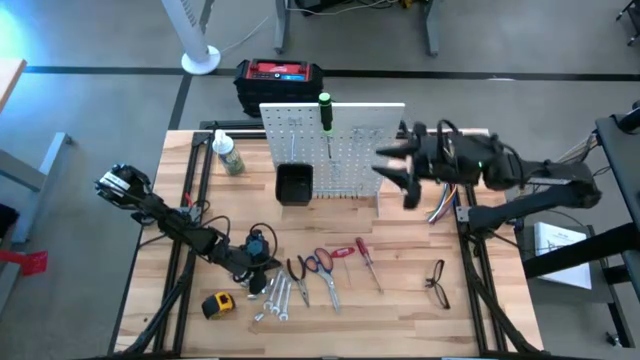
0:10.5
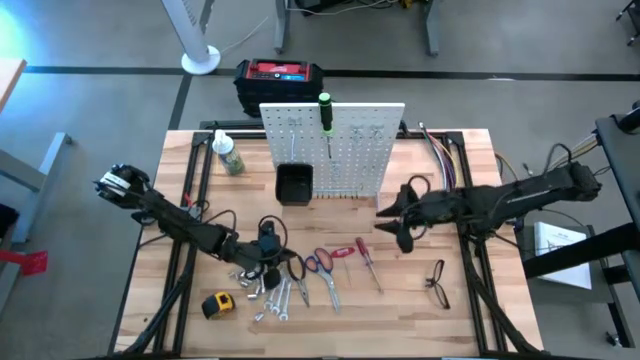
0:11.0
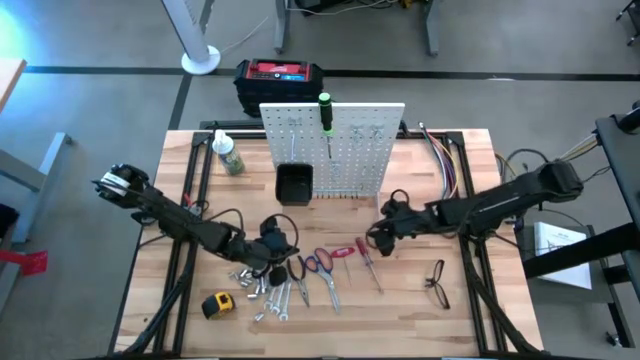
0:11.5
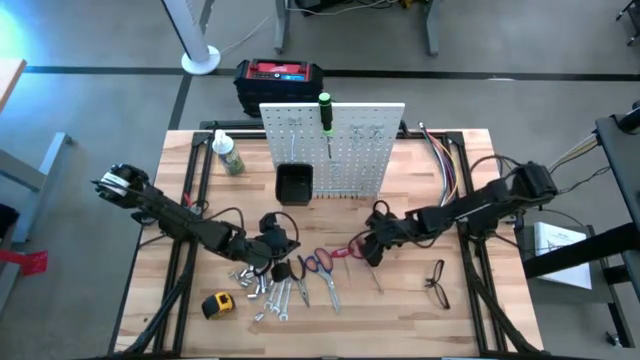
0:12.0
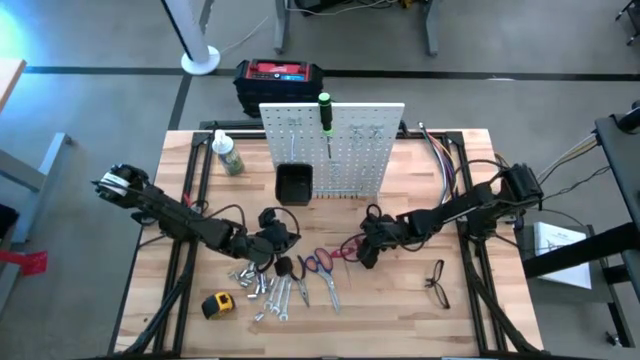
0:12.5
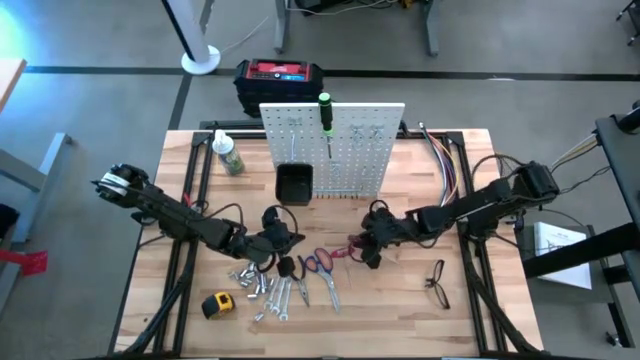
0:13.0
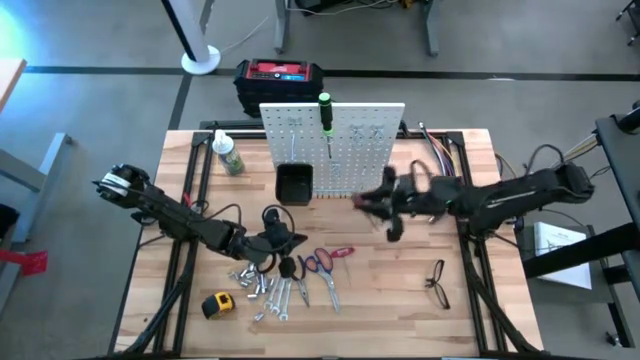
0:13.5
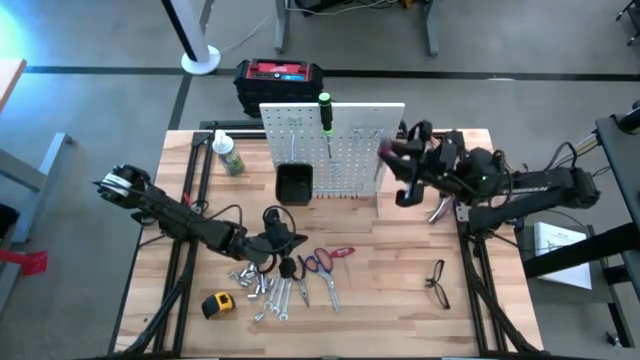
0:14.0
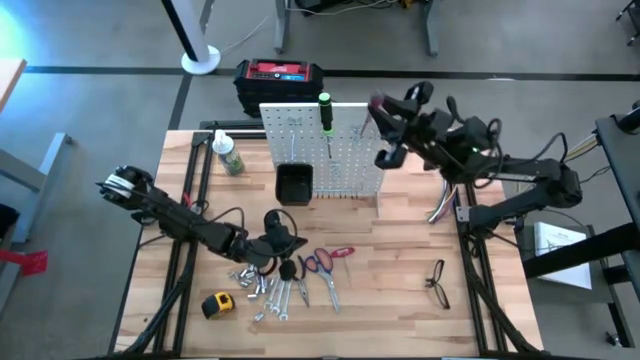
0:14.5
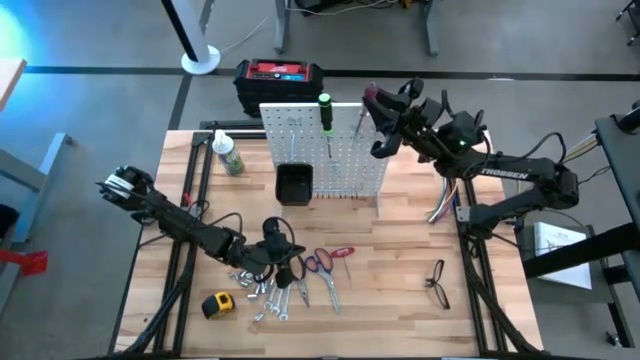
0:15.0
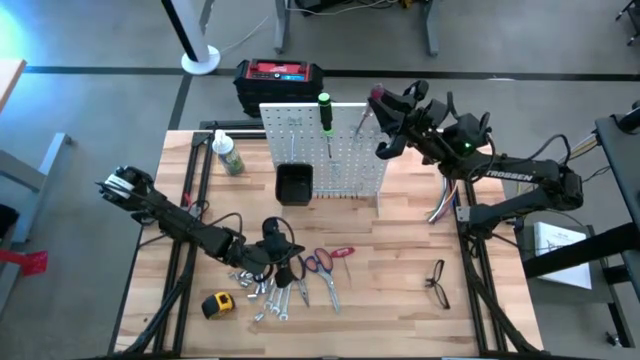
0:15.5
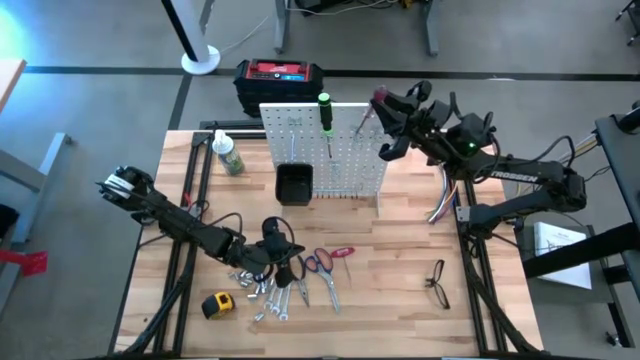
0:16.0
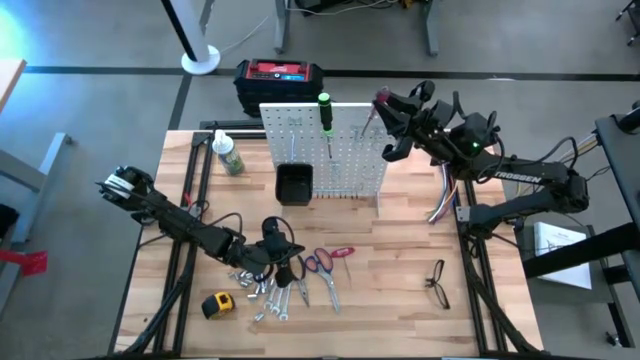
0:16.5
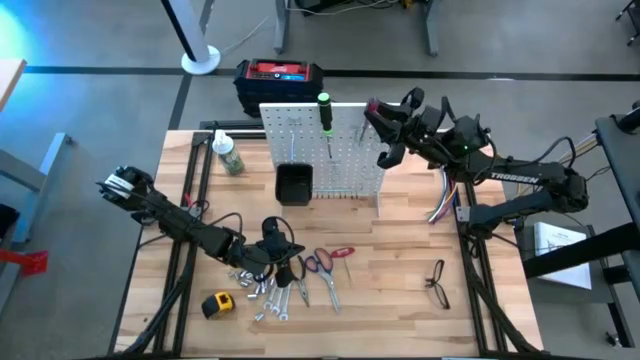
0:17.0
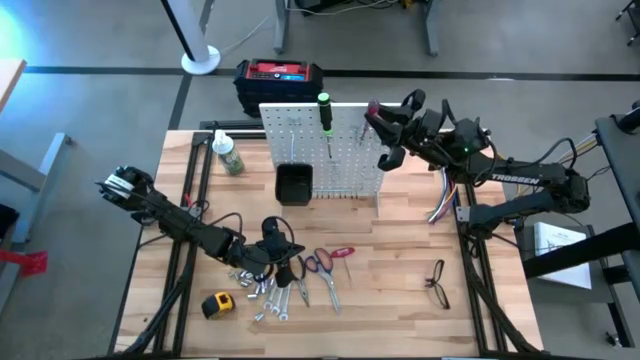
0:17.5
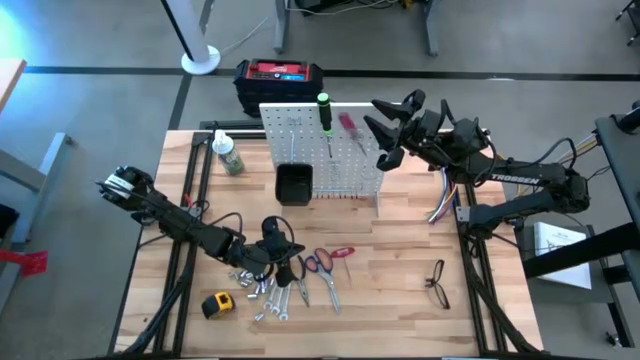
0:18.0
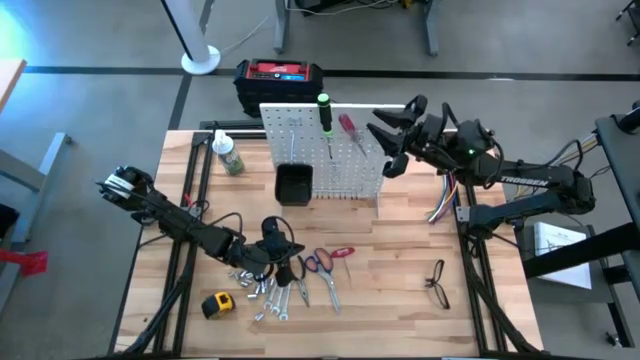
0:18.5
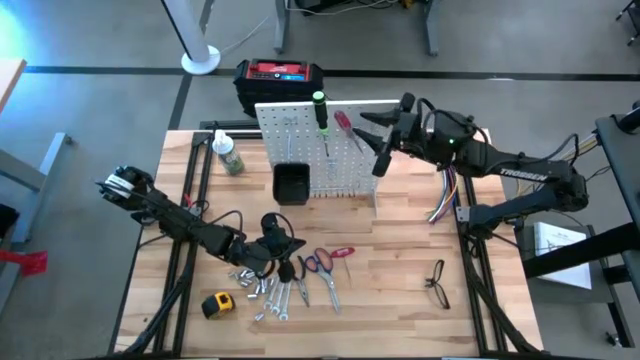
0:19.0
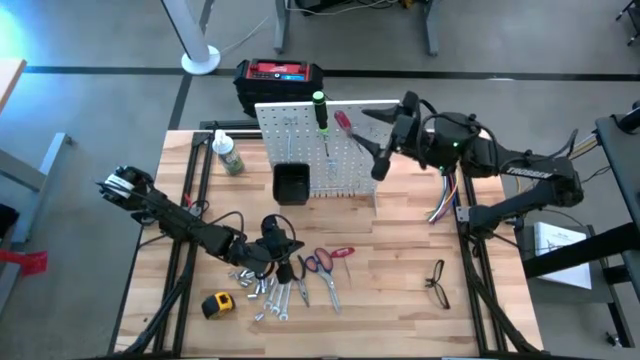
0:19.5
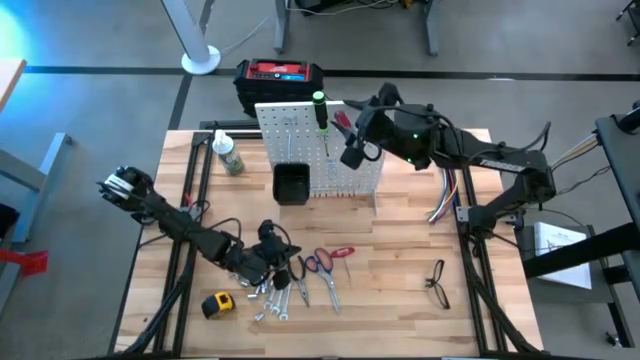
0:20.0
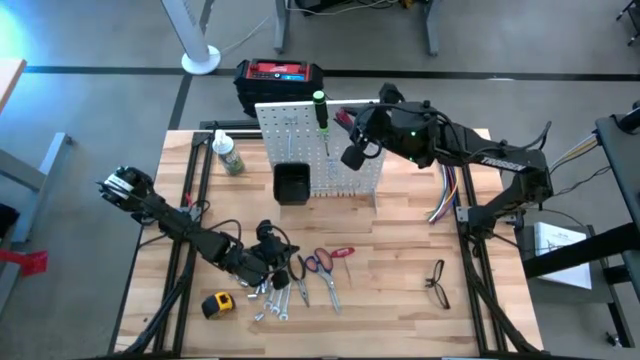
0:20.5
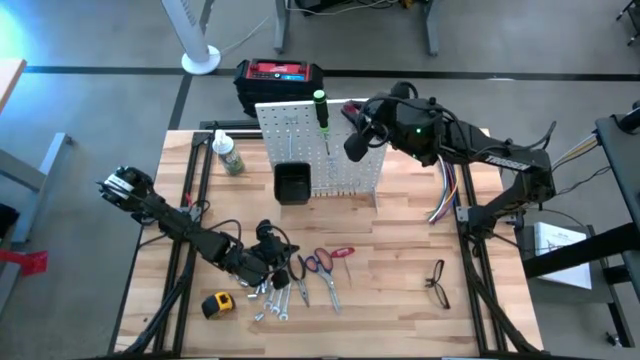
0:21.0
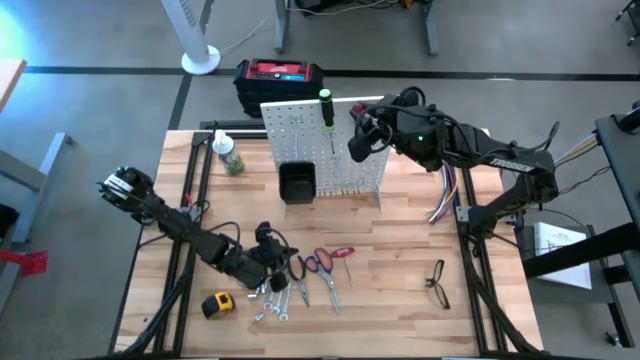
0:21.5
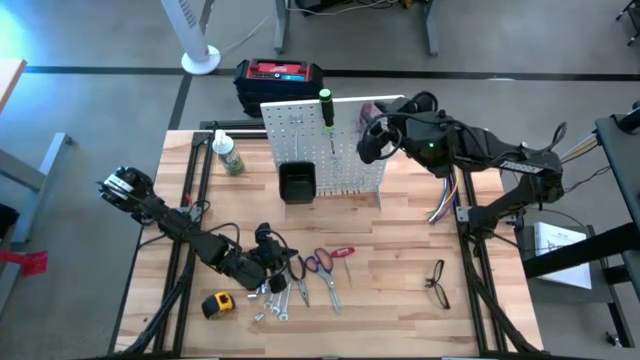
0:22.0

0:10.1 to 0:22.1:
Task: Hang tools onto peg board
Hang the red screwdriver on the pegboard

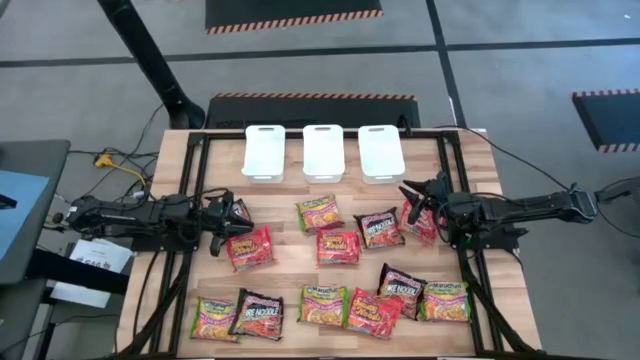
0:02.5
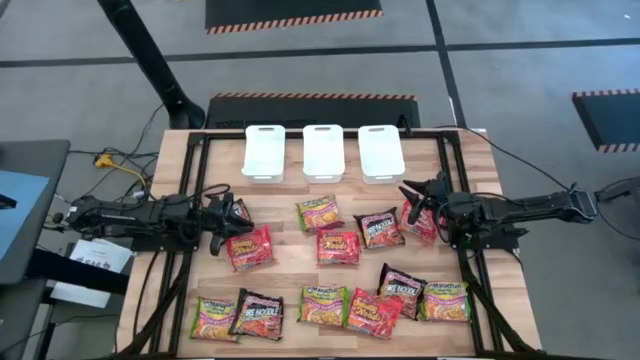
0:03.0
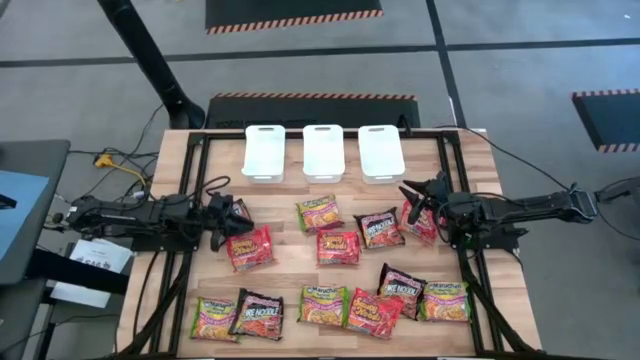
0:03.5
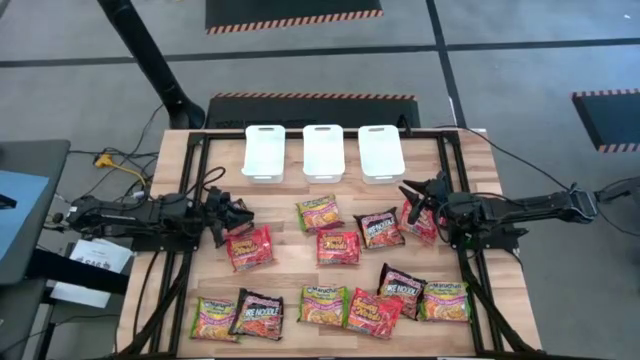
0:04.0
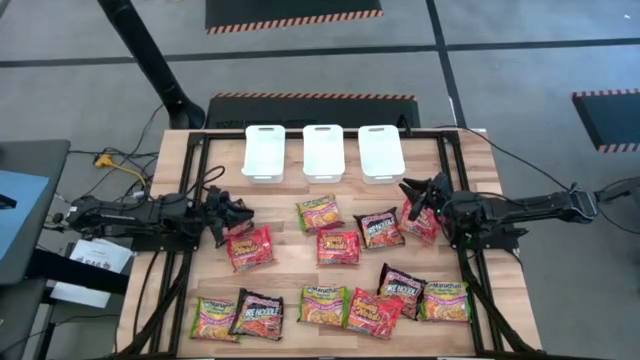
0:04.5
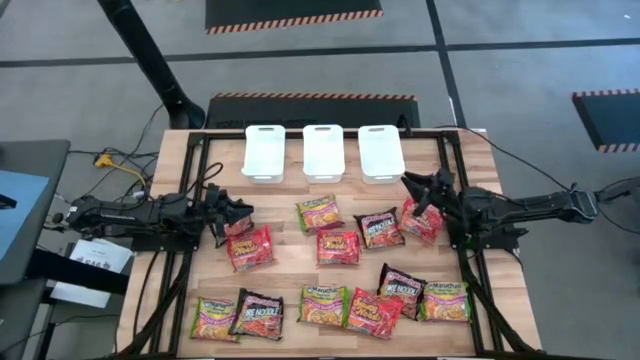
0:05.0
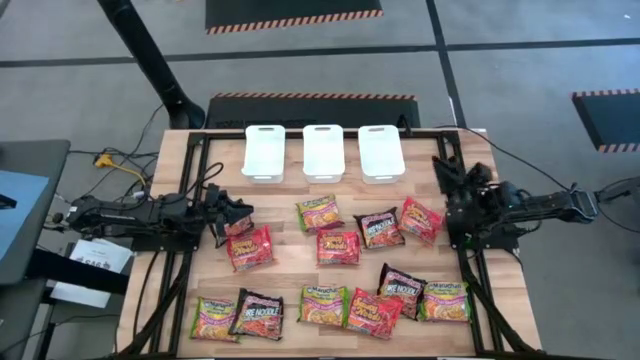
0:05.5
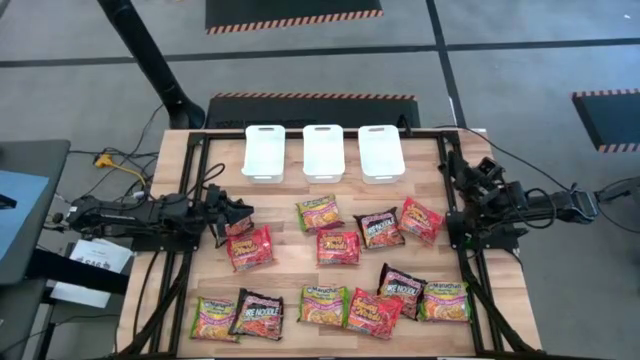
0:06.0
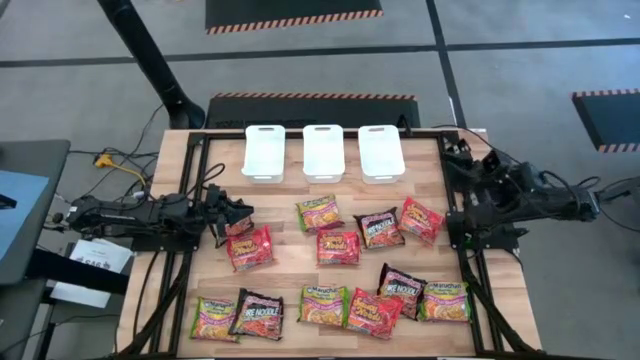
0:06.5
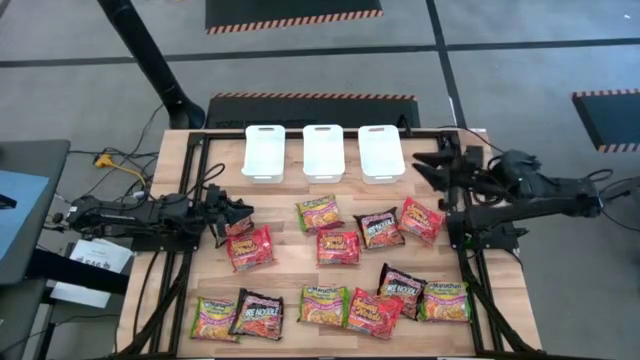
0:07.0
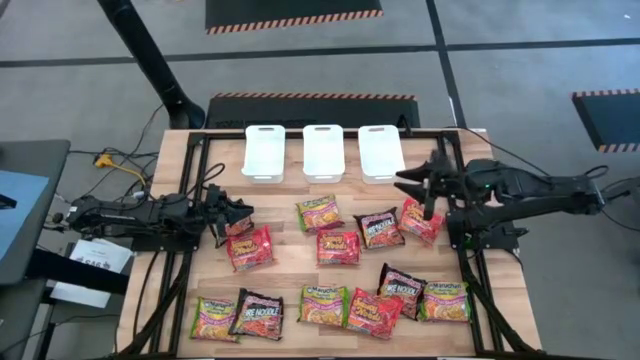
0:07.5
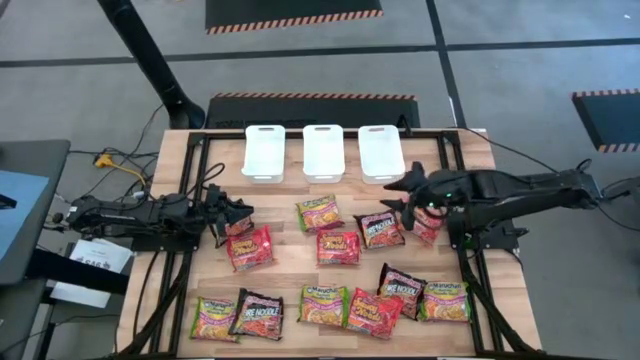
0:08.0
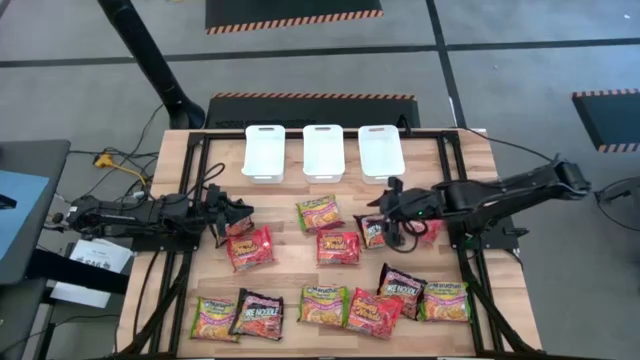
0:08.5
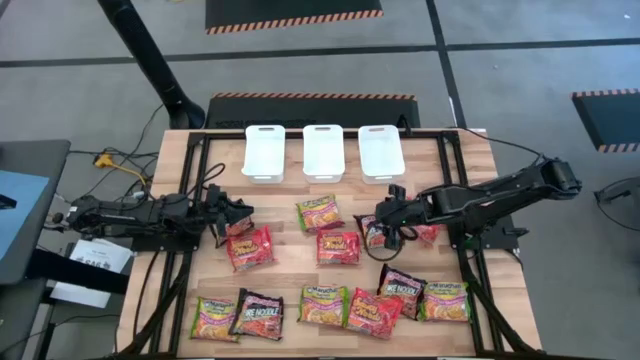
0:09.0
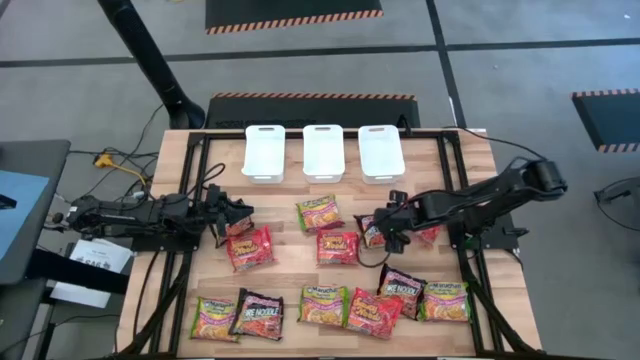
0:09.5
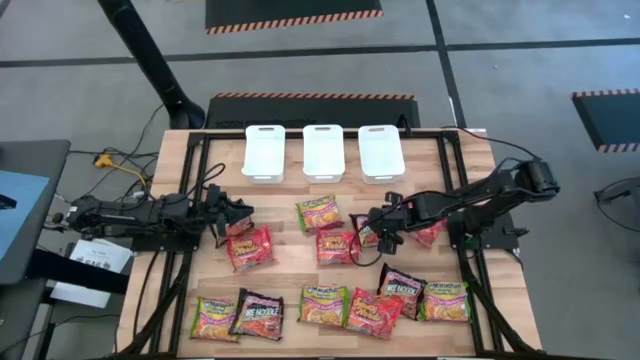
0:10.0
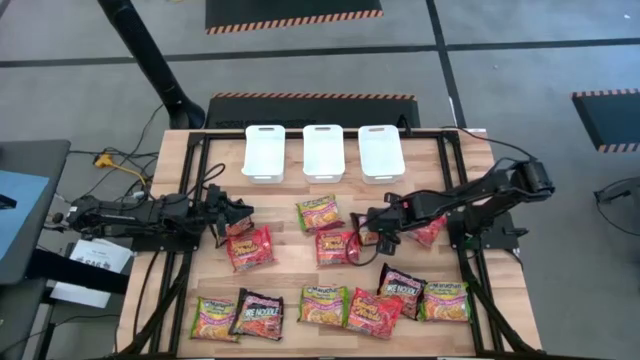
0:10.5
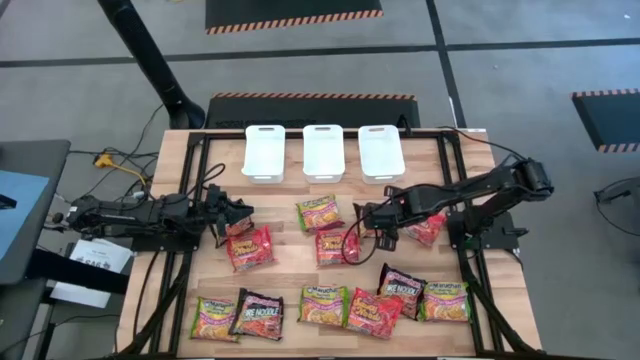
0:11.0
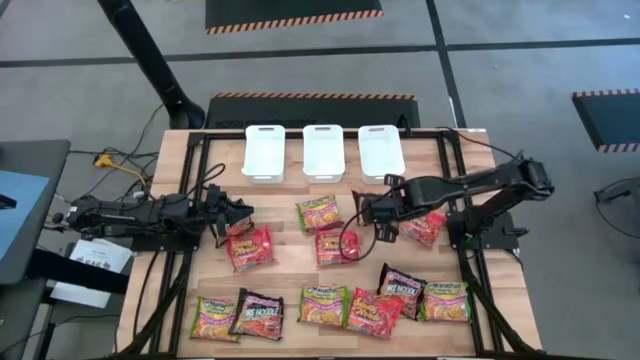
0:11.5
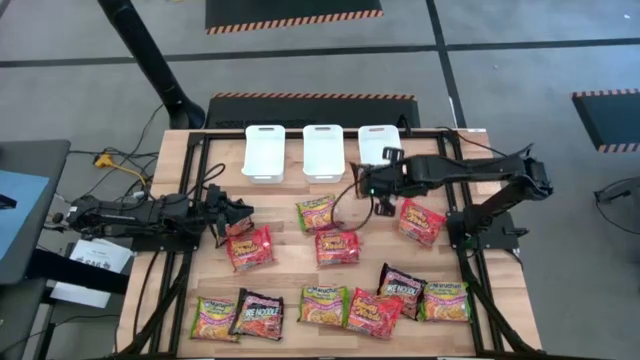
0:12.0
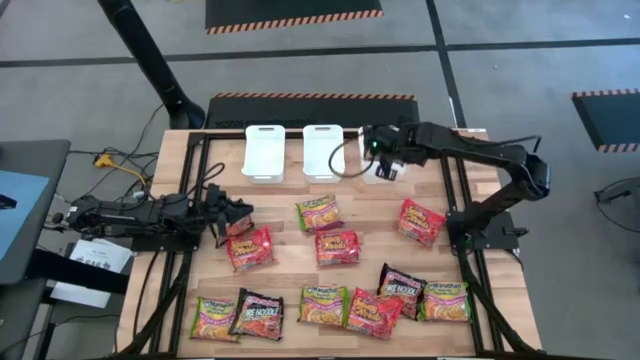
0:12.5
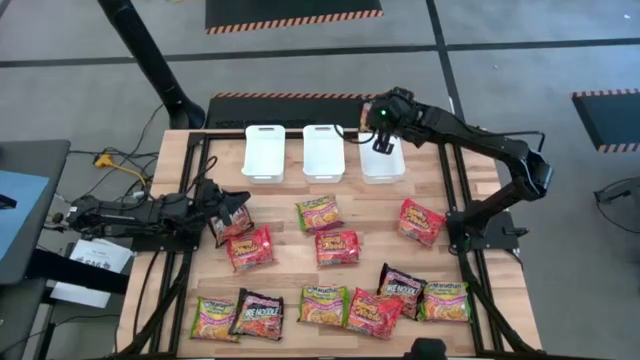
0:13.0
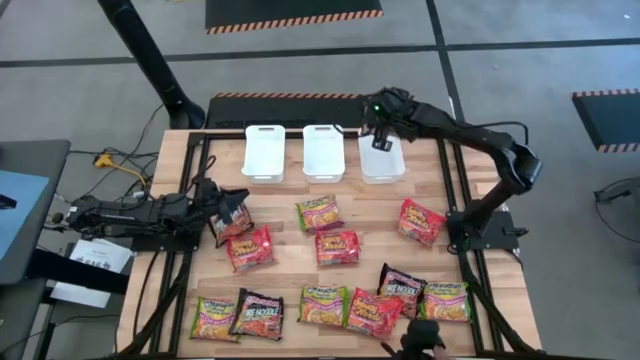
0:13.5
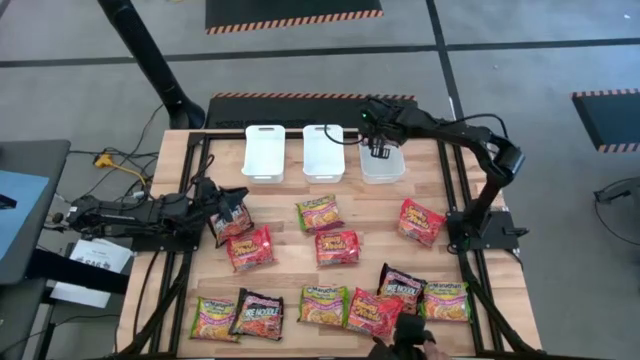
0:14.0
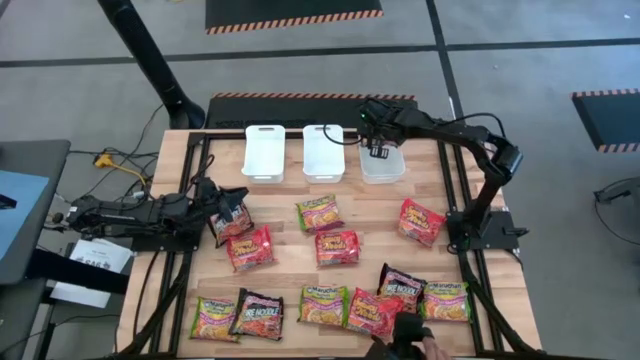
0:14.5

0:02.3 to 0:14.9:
Task: Sort Maruchan noodles
Put the black noodle pack into the right white bin
